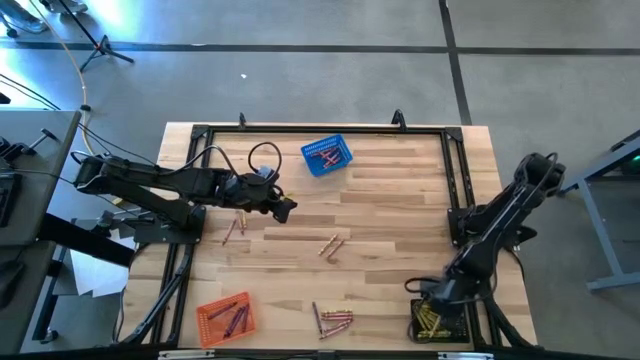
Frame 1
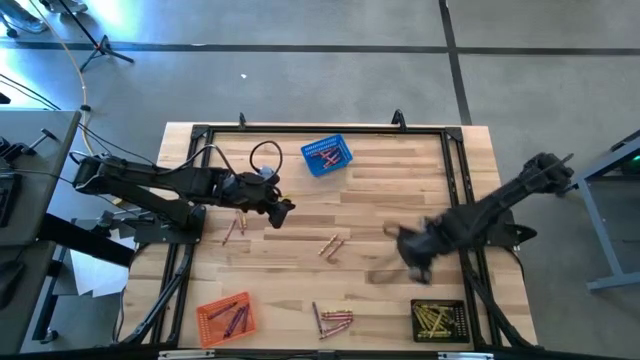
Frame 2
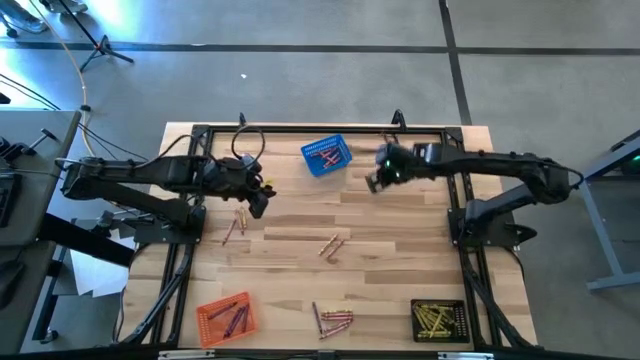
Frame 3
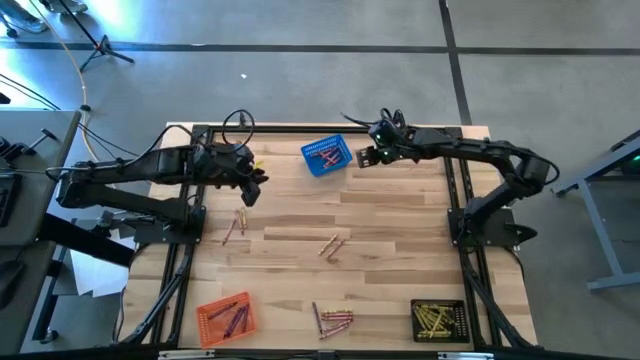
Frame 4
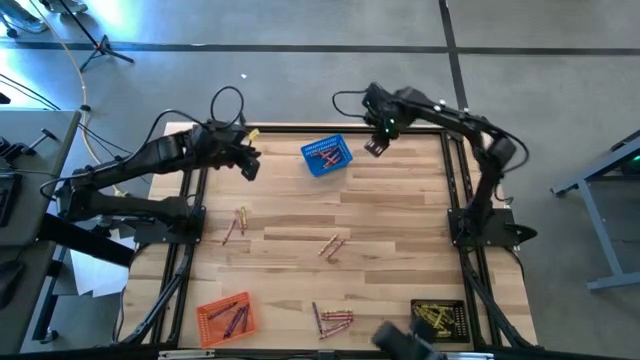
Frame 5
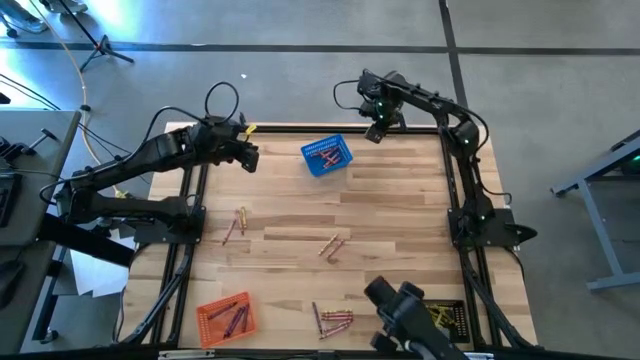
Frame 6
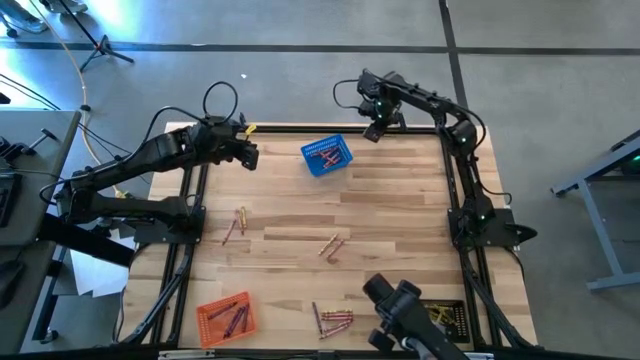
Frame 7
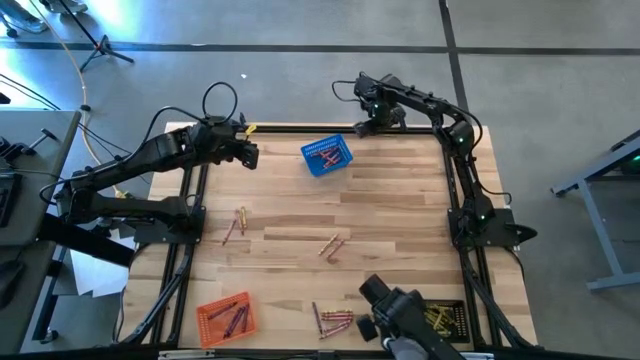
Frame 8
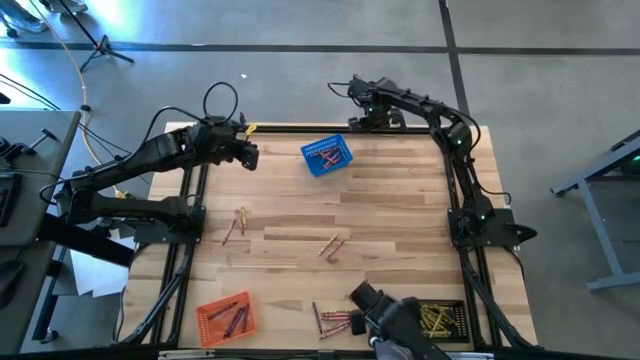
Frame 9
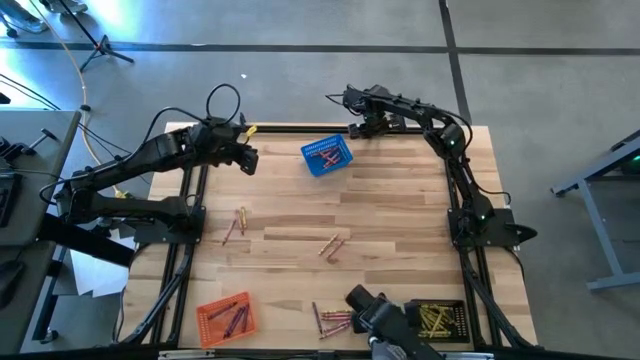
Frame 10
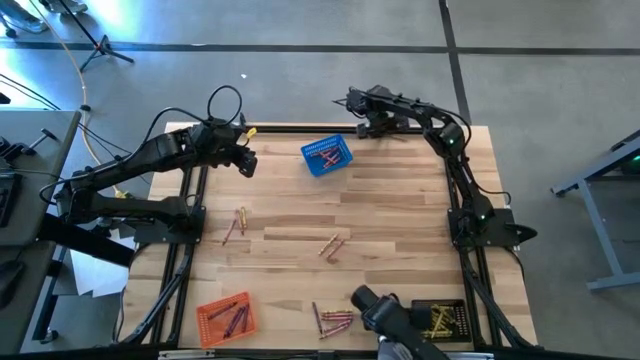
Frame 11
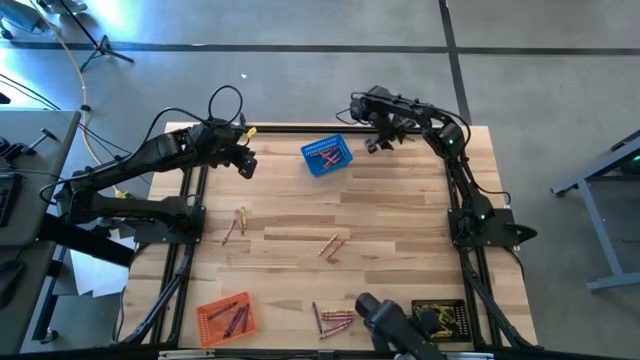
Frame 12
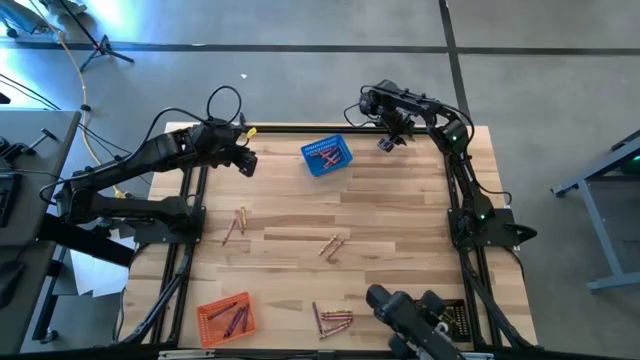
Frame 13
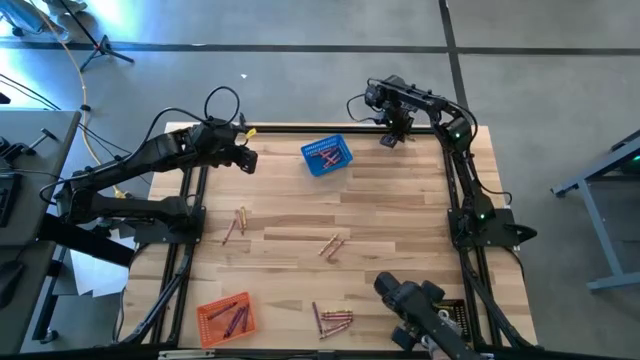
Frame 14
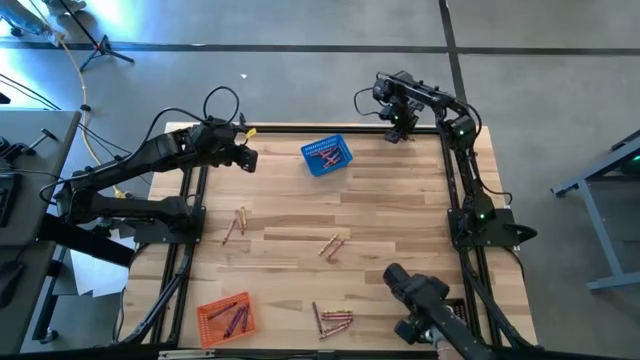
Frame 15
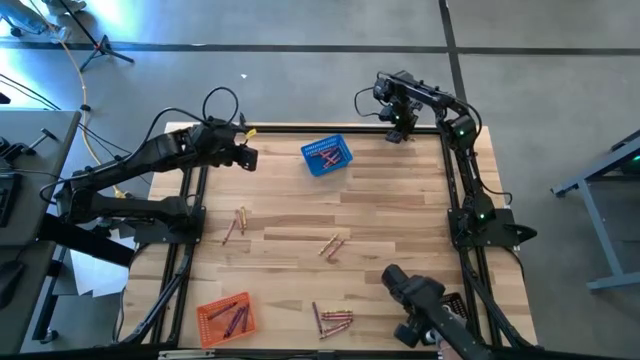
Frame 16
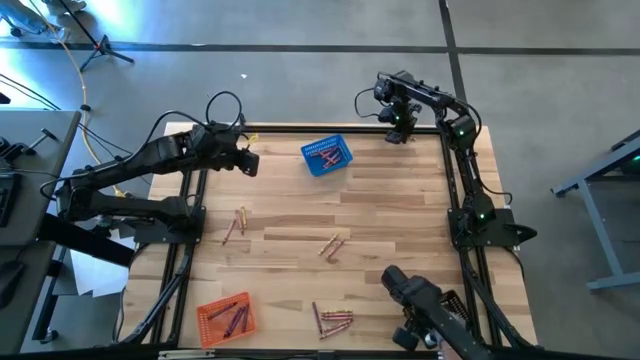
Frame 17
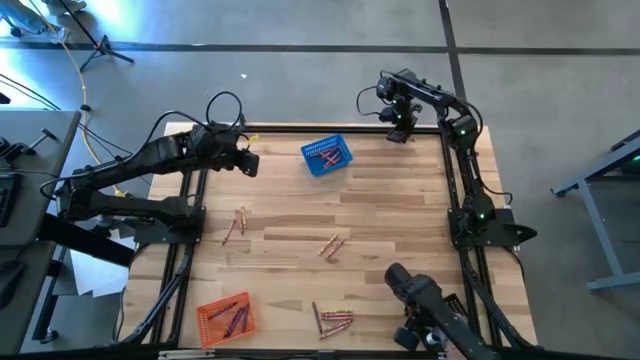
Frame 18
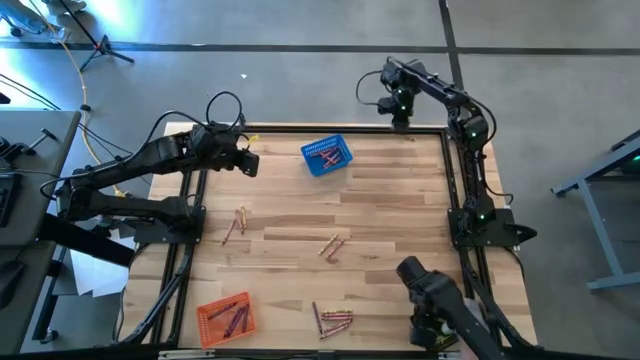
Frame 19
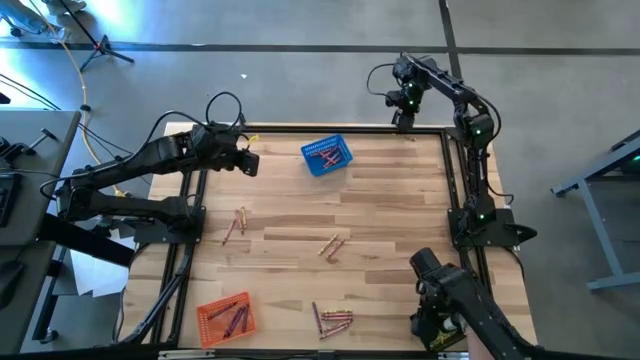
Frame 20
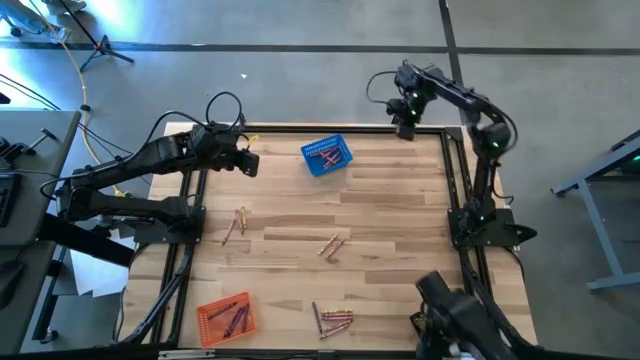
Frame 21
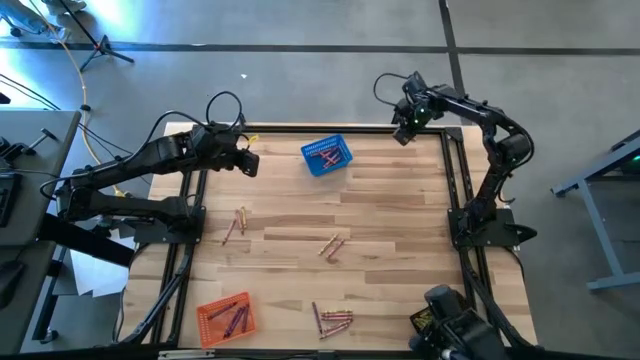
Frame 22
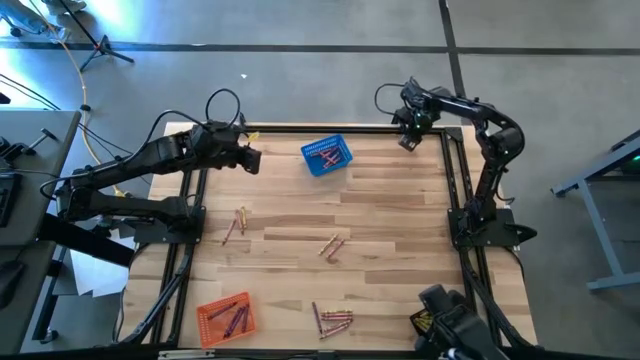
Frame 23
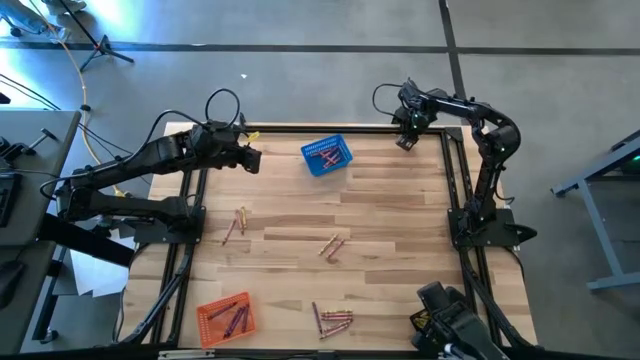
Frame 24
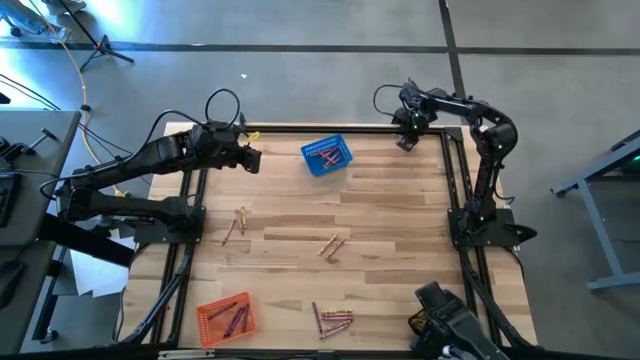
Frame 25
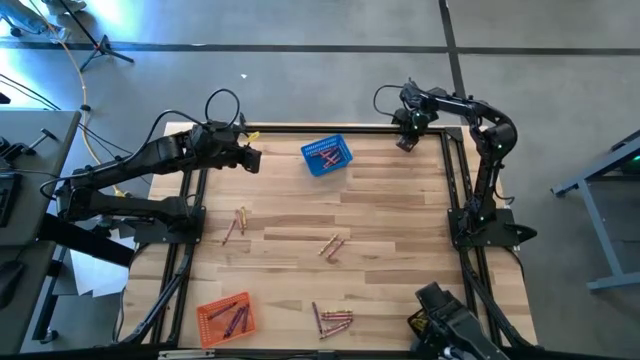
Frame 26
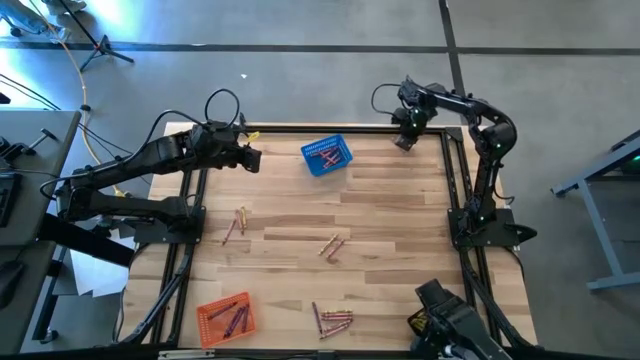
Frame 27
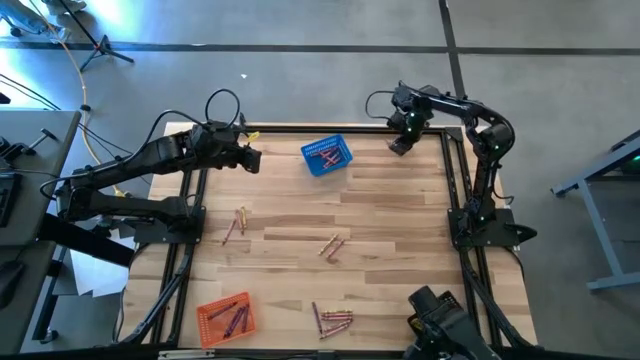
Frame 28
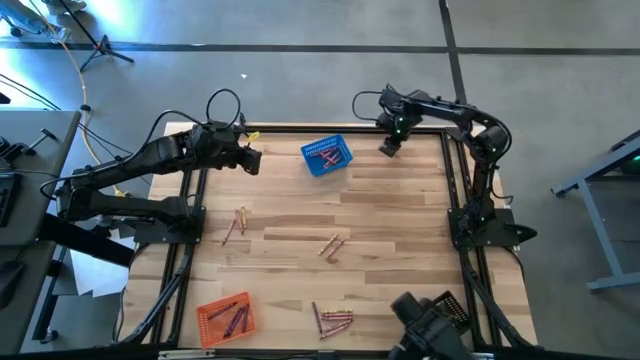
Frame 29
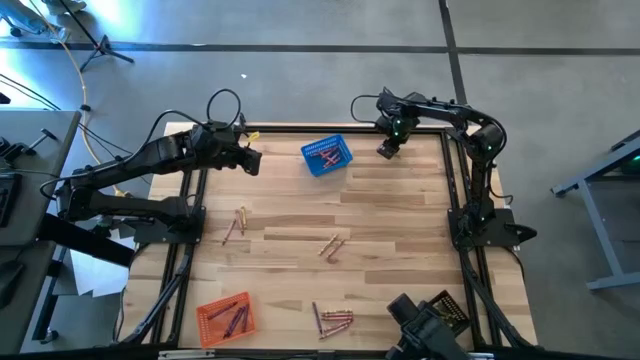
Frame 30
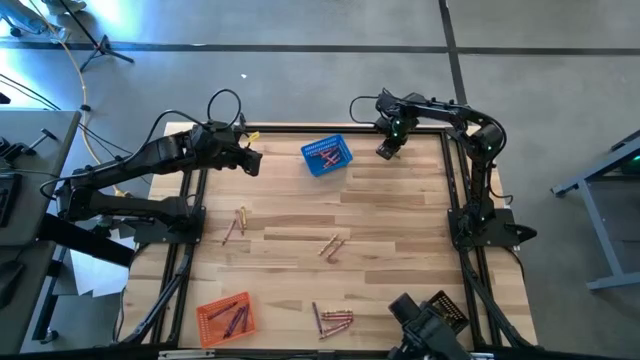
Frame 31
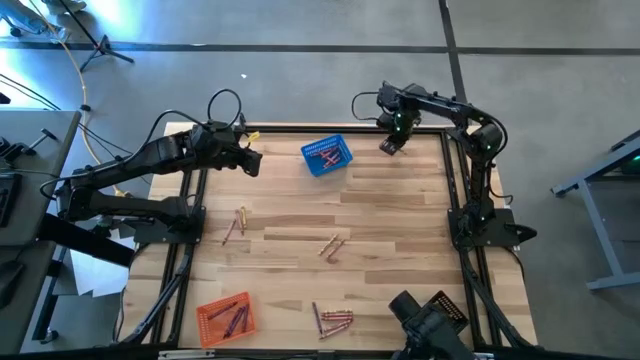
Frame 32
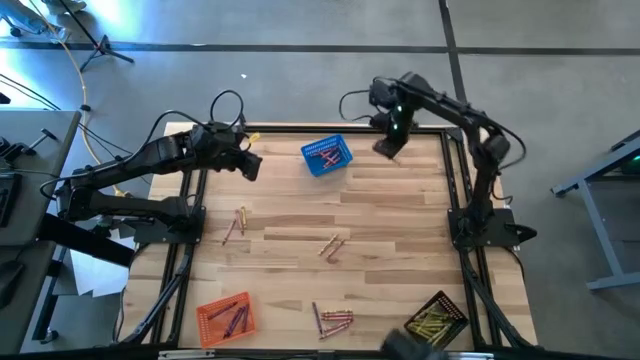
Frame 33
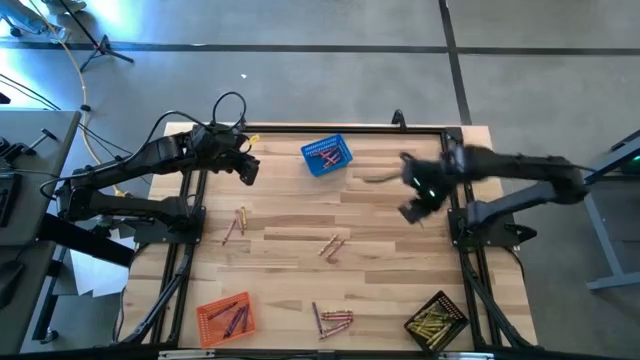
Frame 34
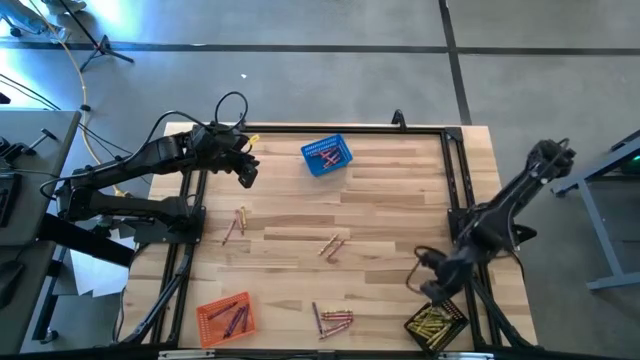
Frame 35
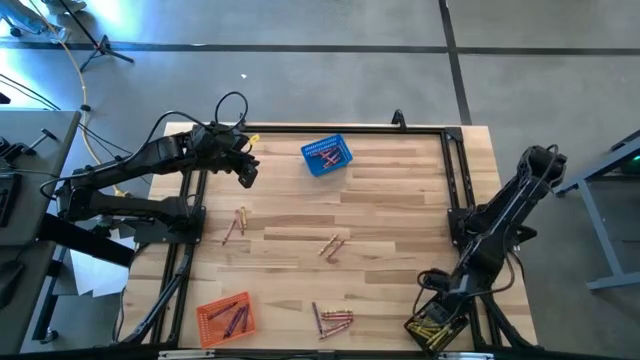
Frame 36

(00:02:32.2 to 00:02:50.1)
Task: Sort crayons
Put the yellow crayon into the black bin

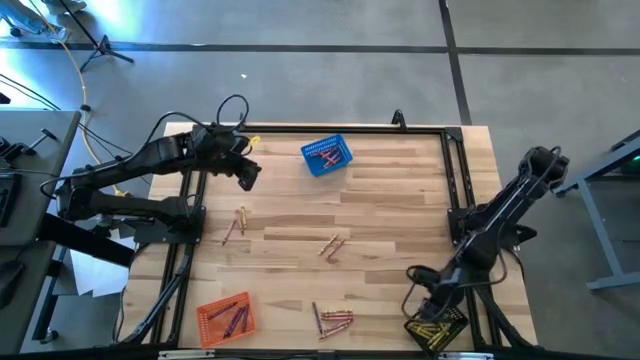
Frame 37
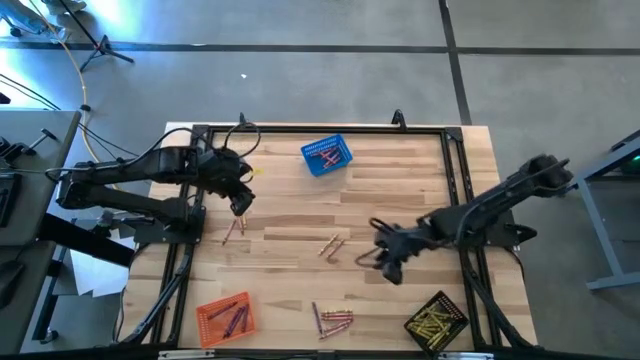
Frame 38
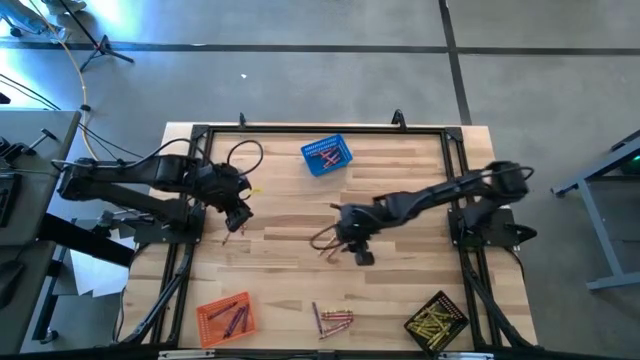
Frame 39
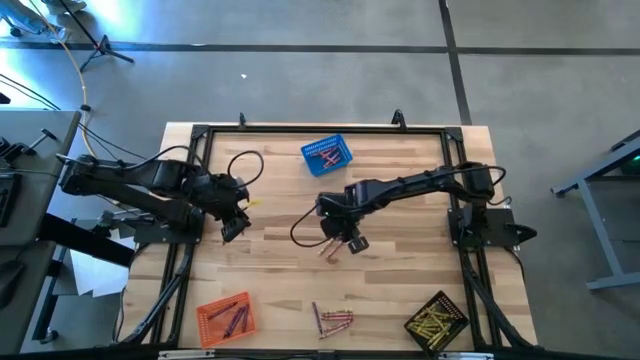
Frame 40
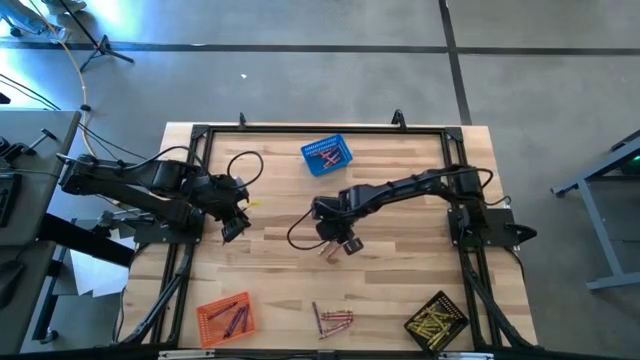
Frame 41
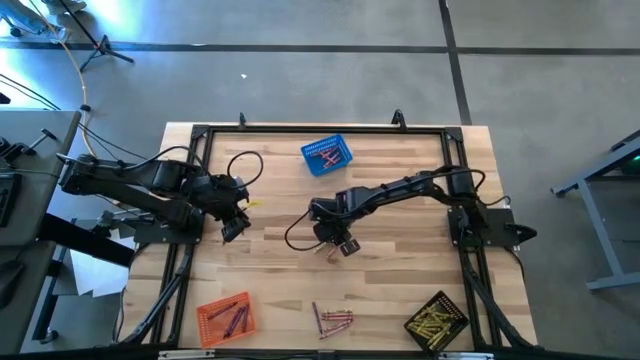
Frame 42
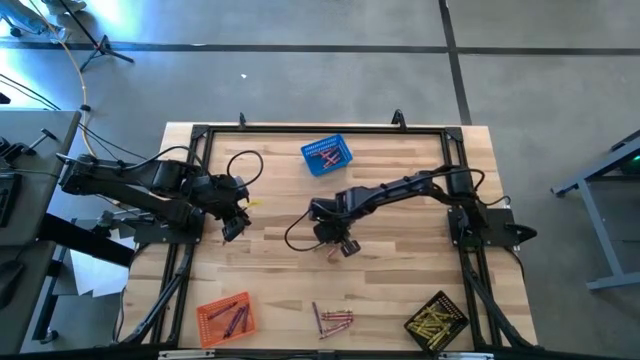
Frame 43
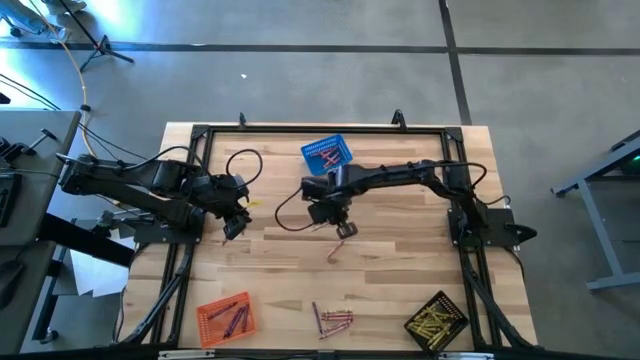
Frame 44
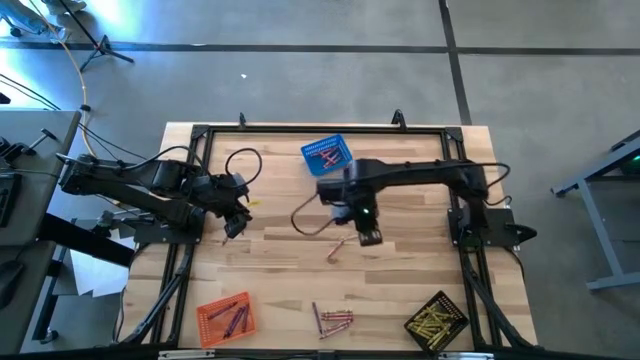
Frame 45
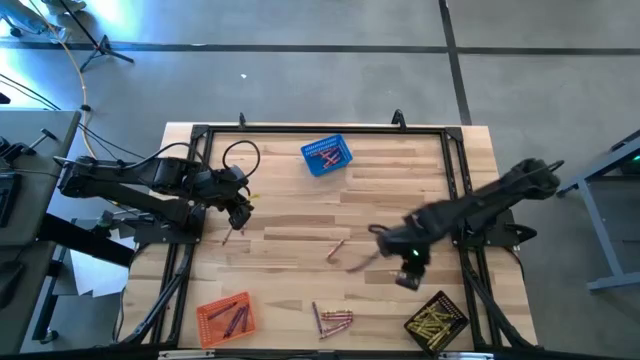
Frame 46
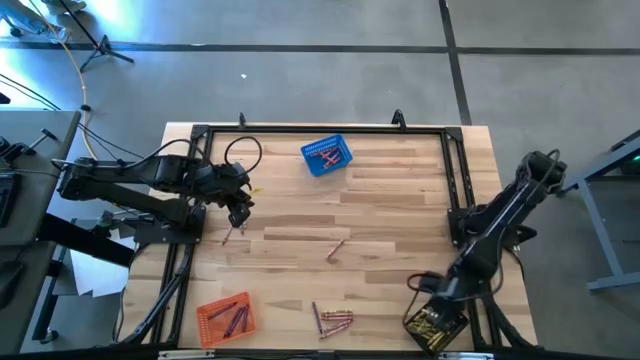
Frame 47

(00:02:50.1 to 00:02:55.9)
Put the yellow crayon into the black bin
